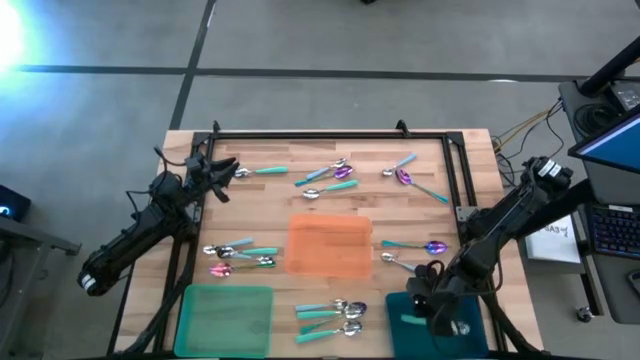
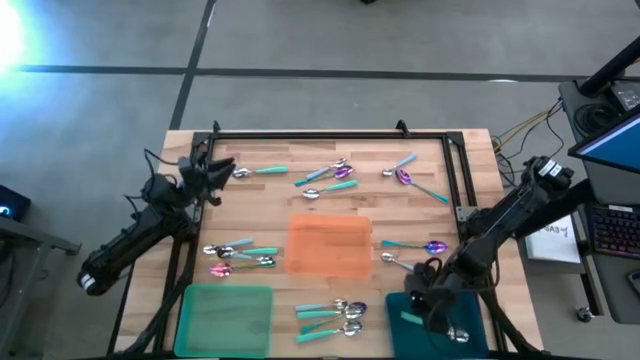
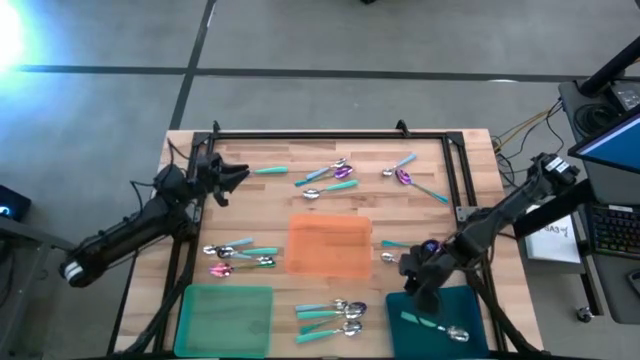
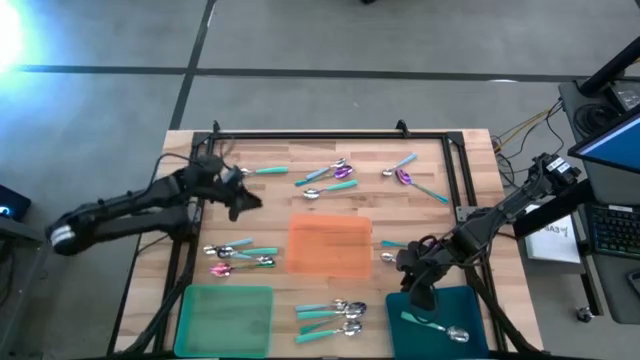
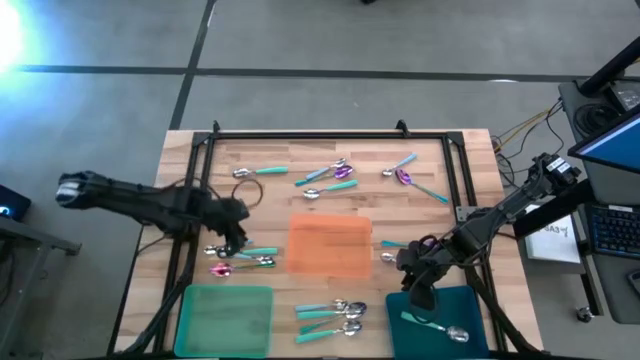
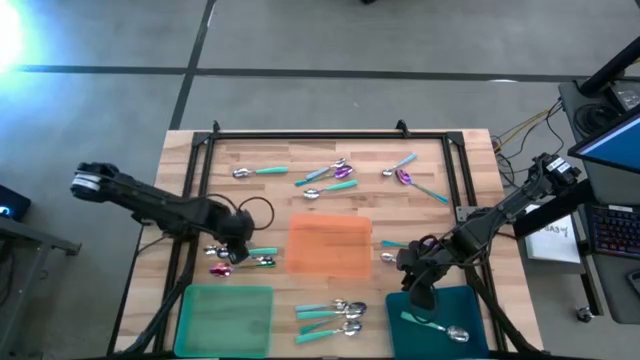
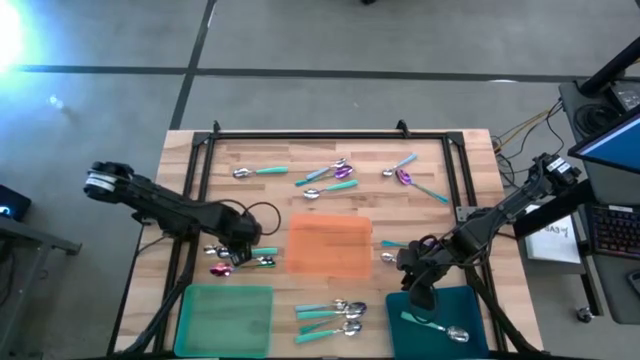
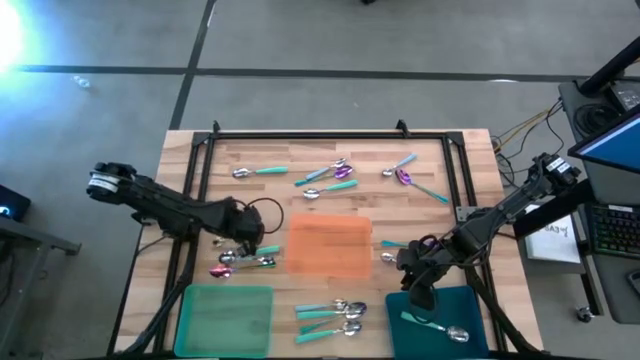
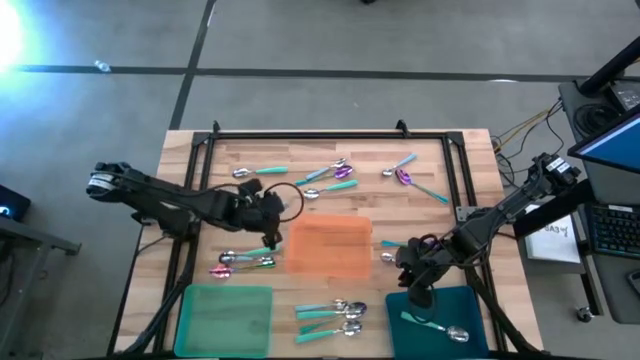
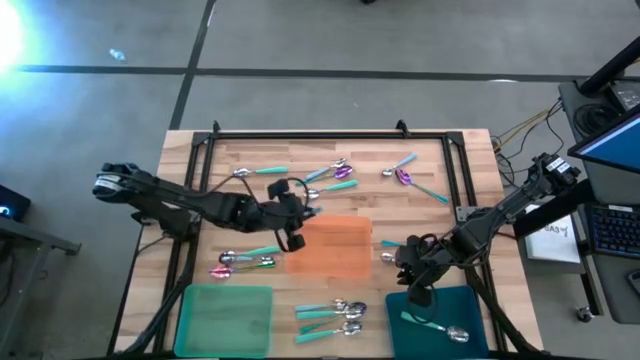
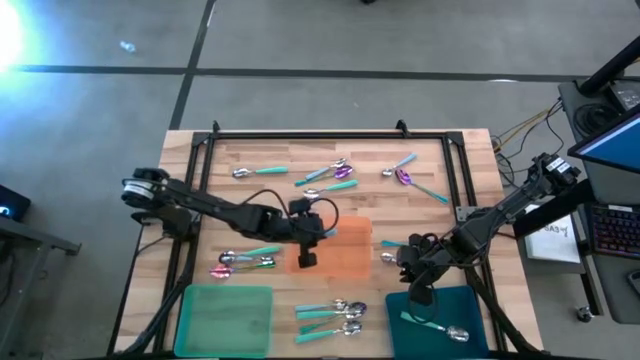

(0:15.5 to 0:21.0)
Task: Sort silverware by color (type)
Put the blue spoon into the orange bin

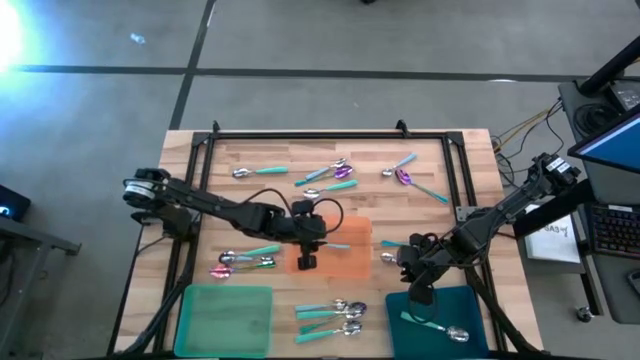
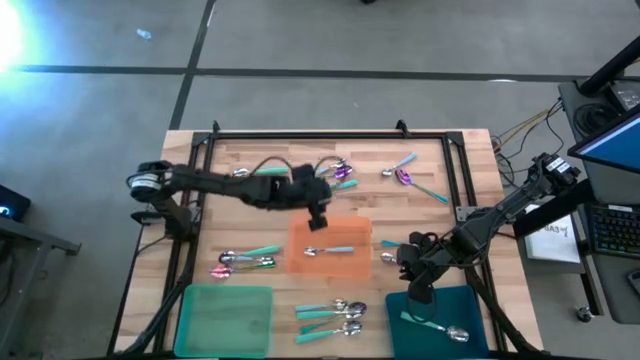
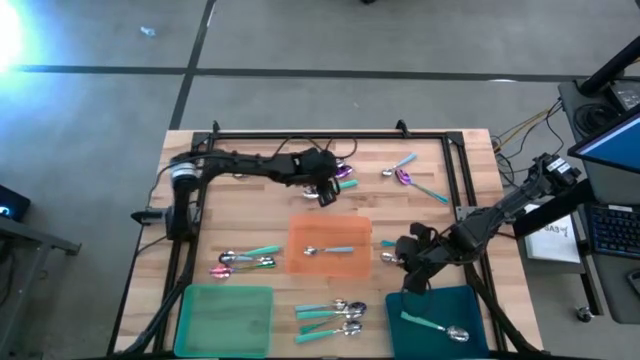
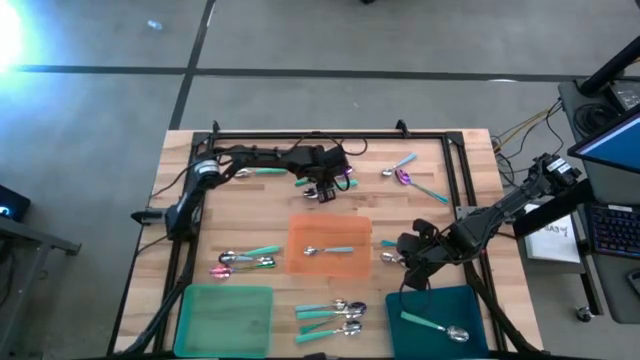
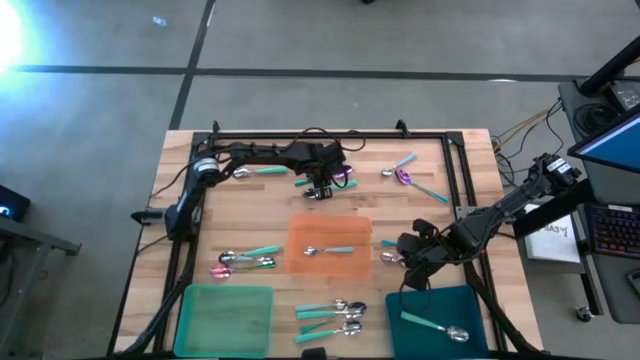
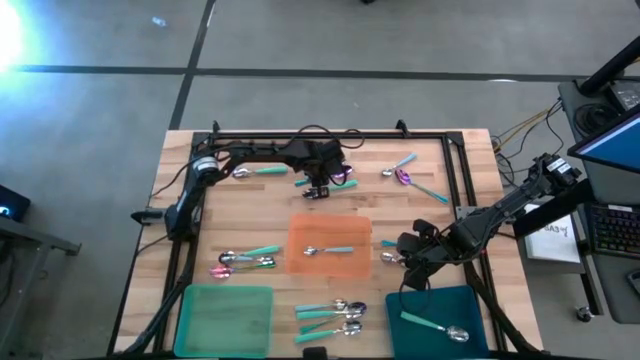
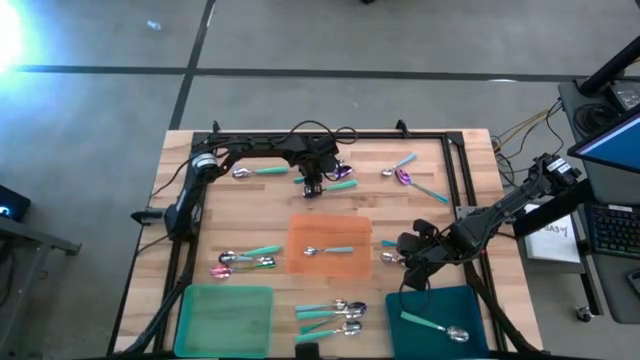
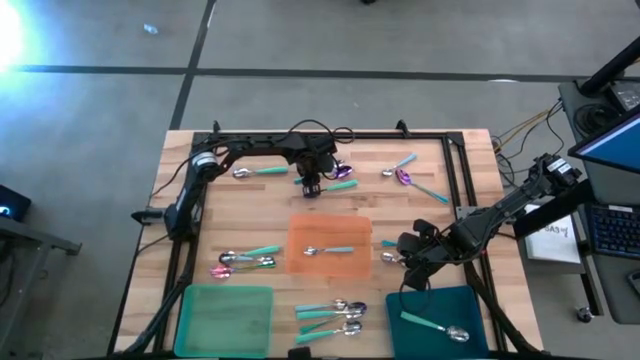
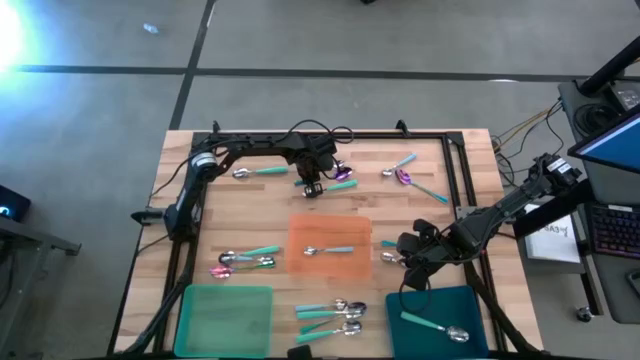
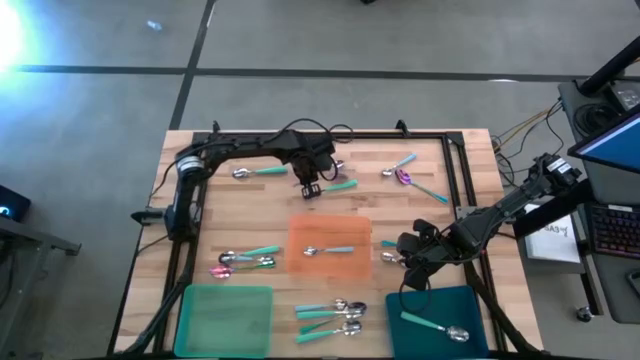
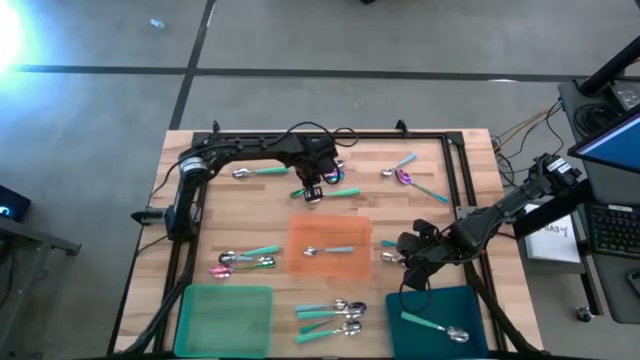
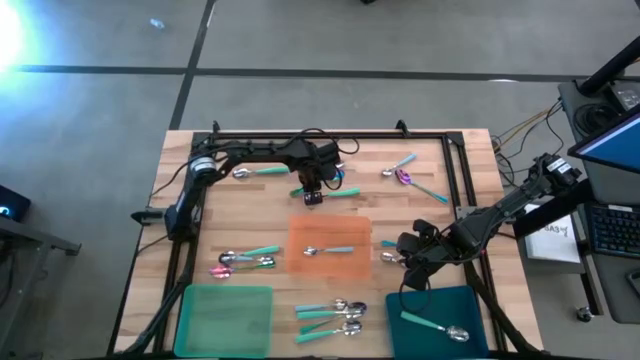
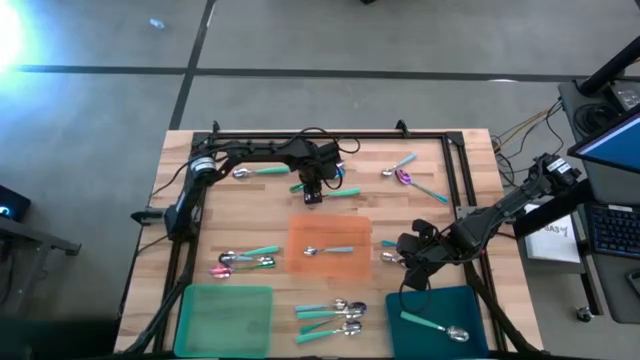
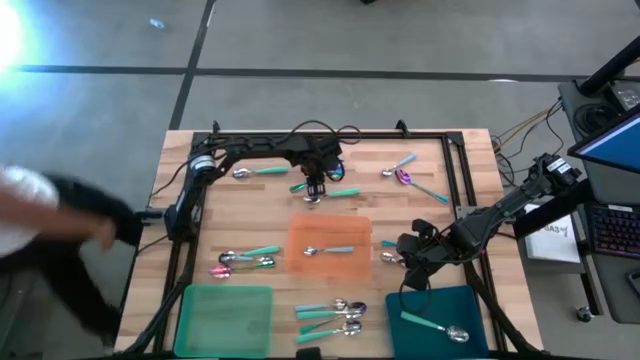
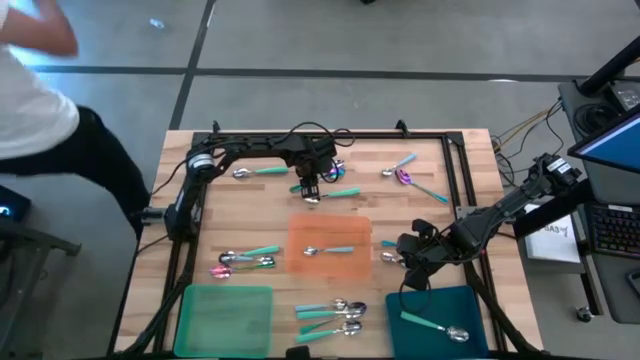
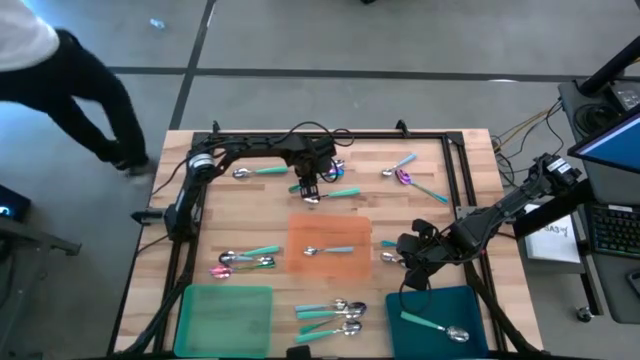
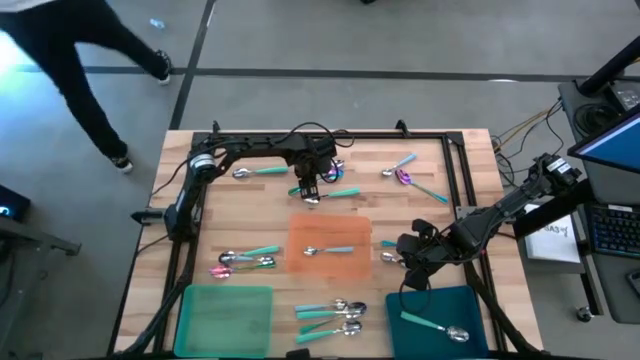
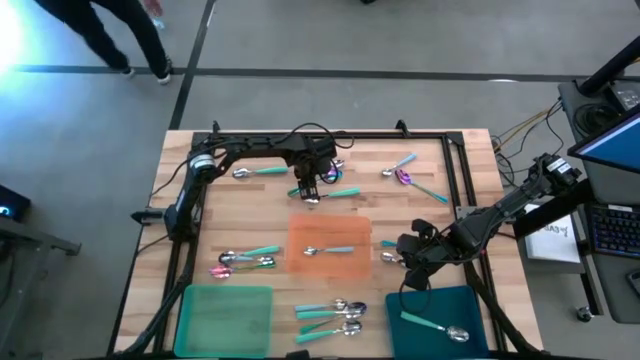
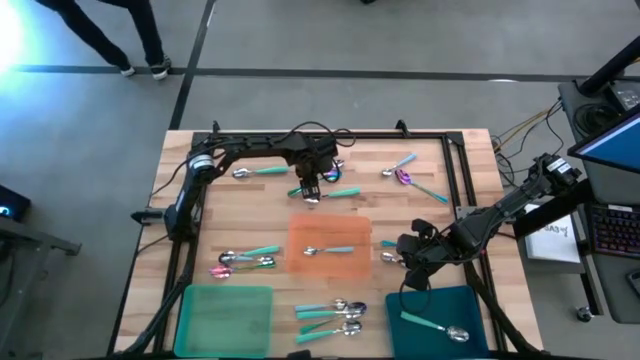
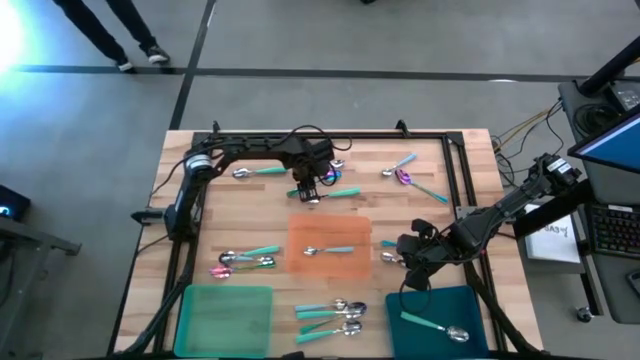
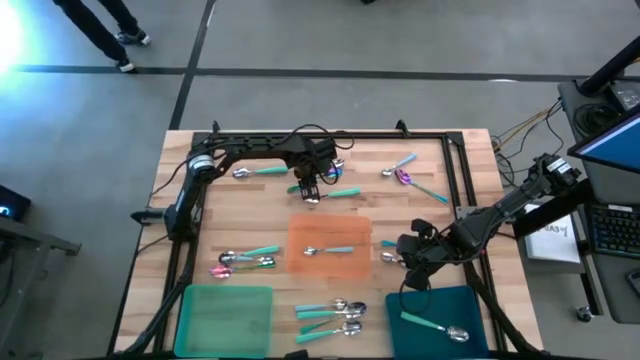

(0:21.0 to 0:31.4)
Put the violet spoon into the green bin

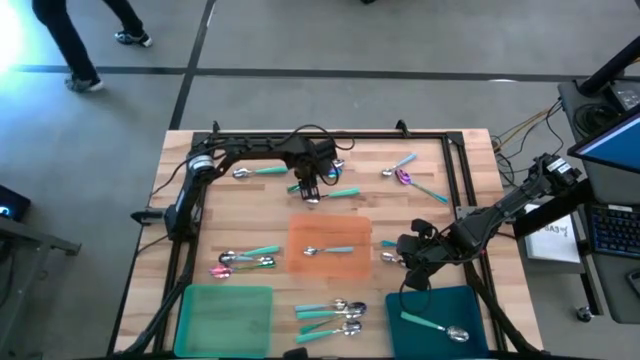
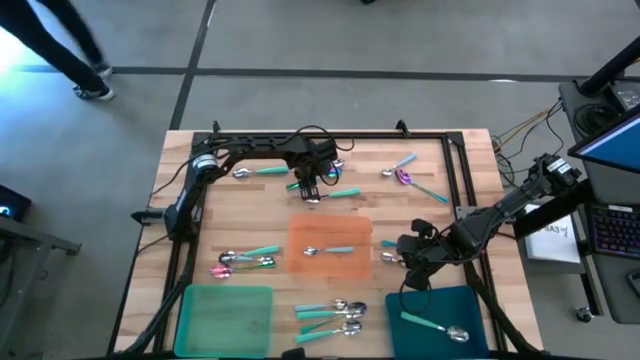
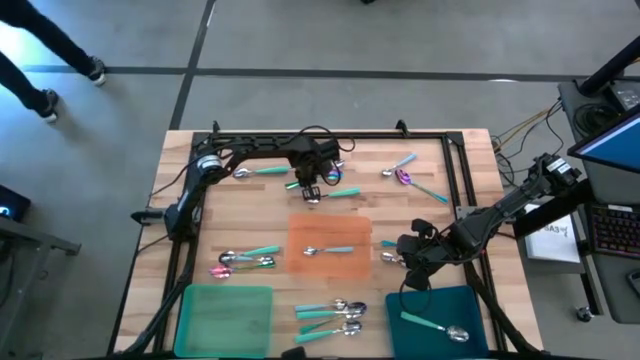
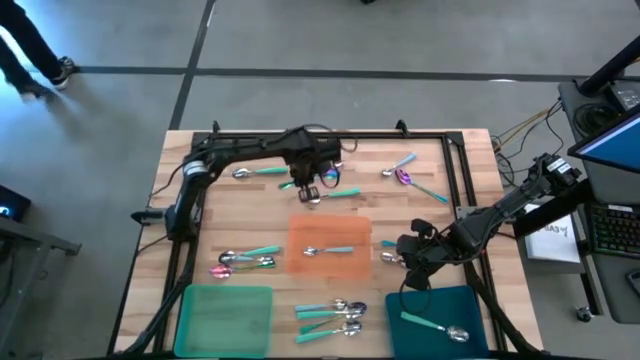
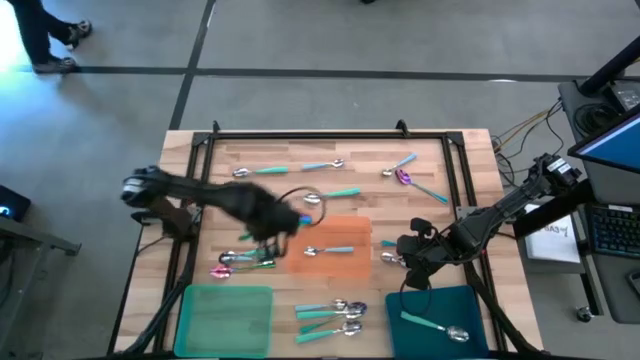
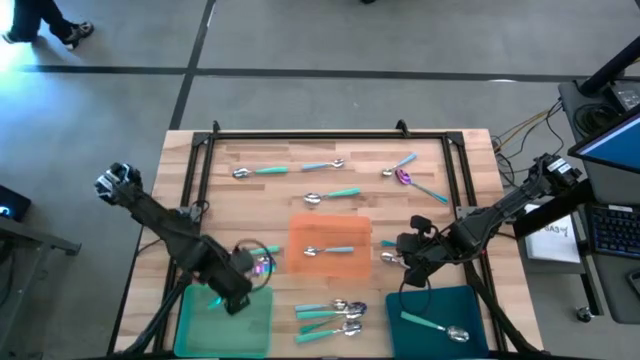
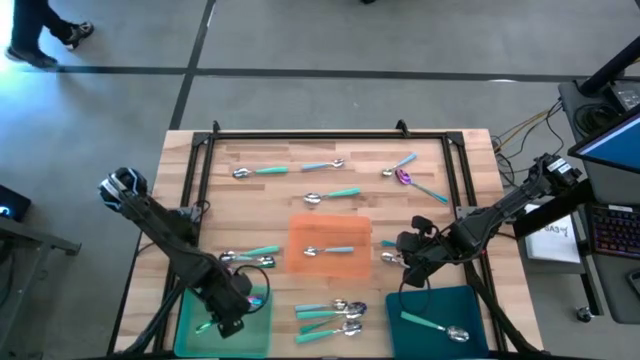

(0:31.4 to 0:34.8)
Put the violet spoon into the green bin

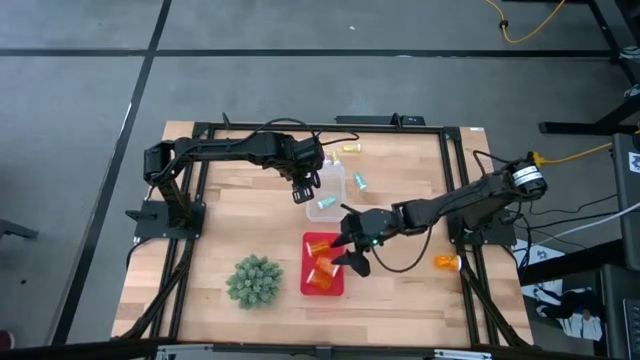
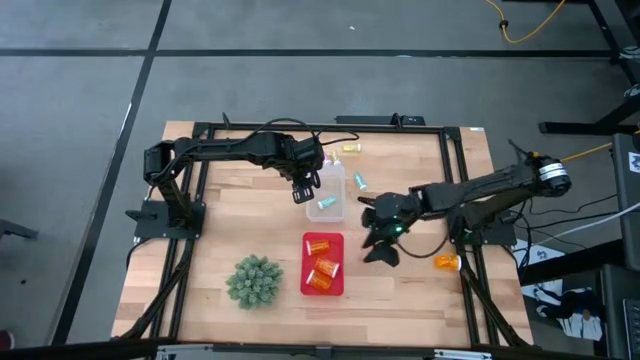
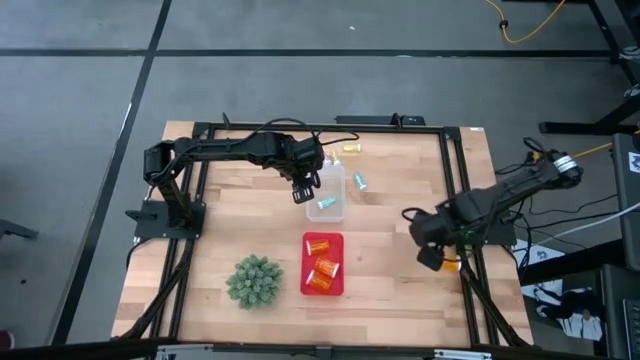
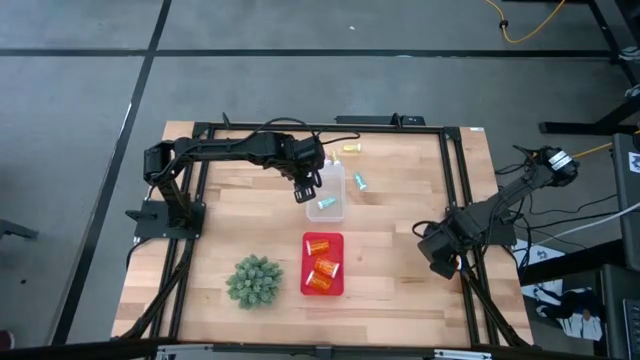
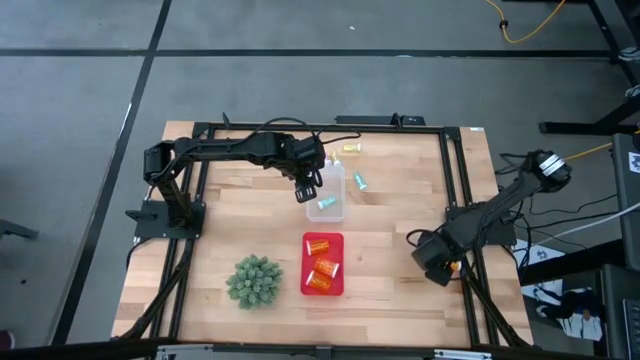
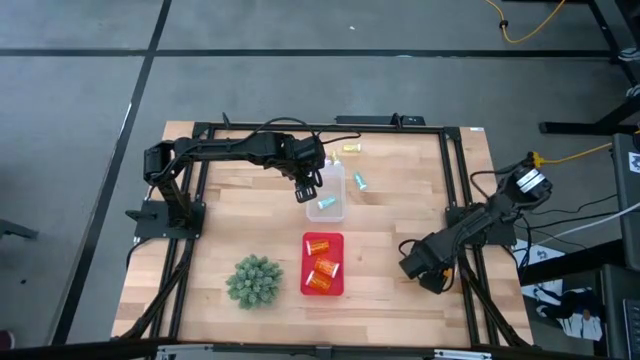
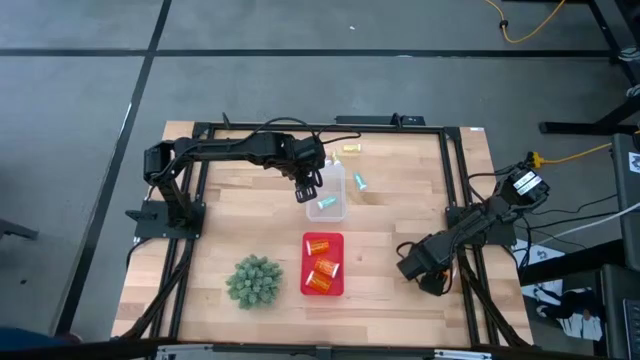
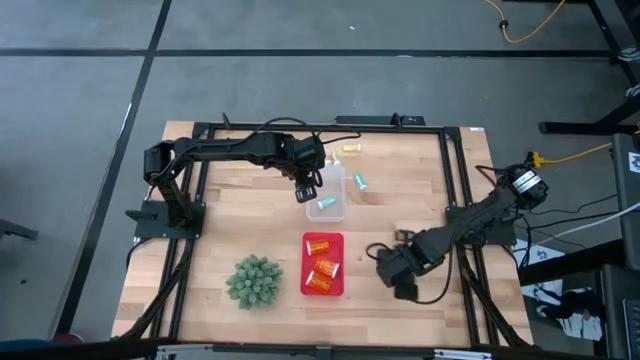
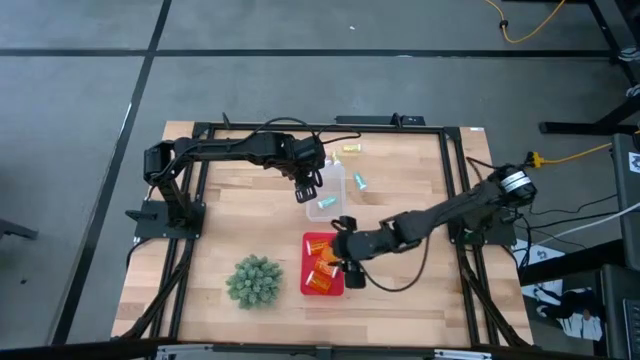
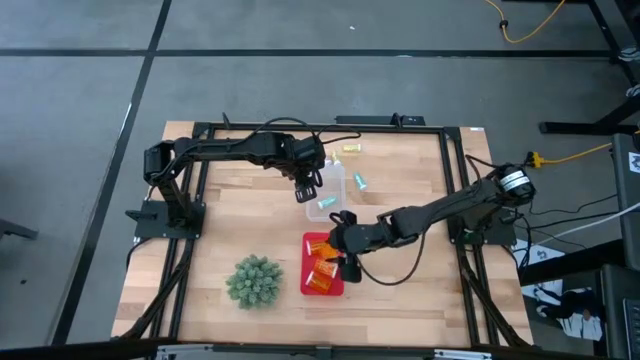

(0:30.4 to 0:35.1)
Task: Pick and place medicine bottles into bin by pill shape (circle, oval)
Put the big orange pill bottle into the red bin
